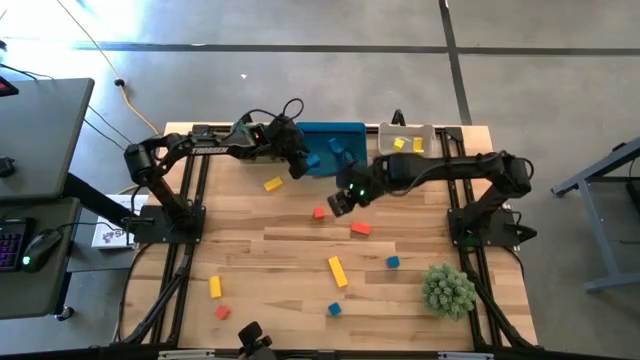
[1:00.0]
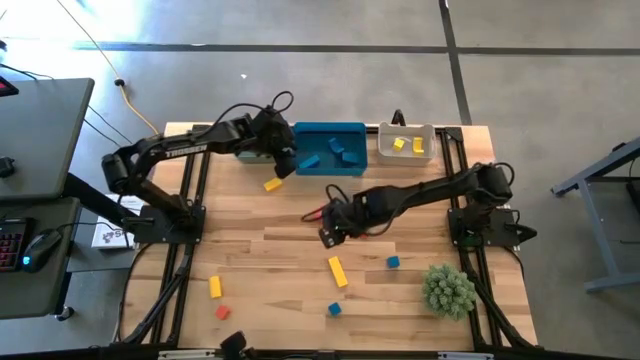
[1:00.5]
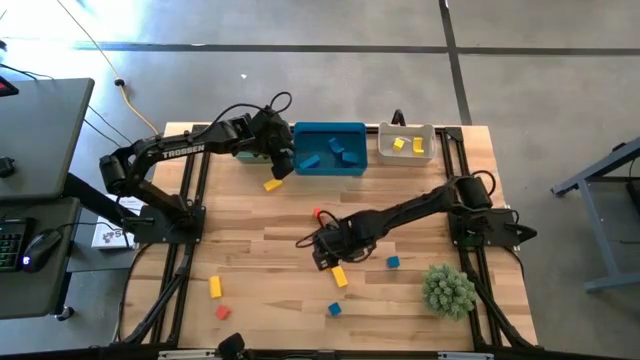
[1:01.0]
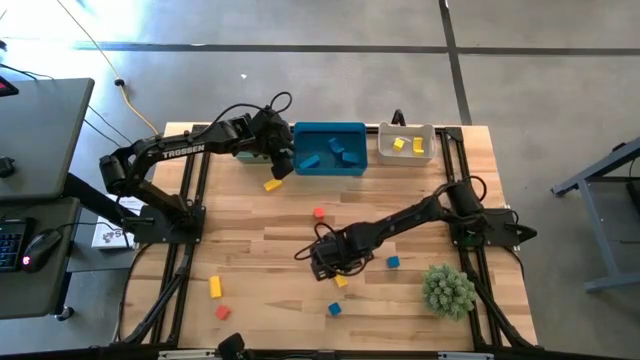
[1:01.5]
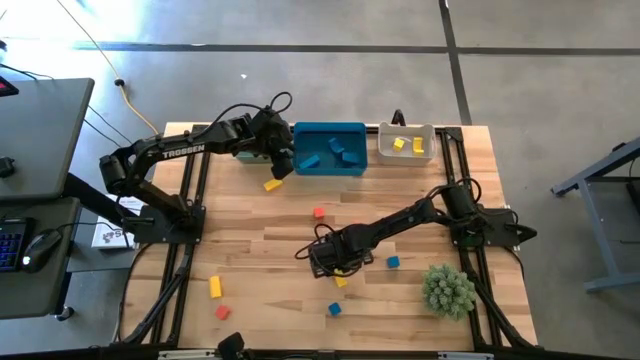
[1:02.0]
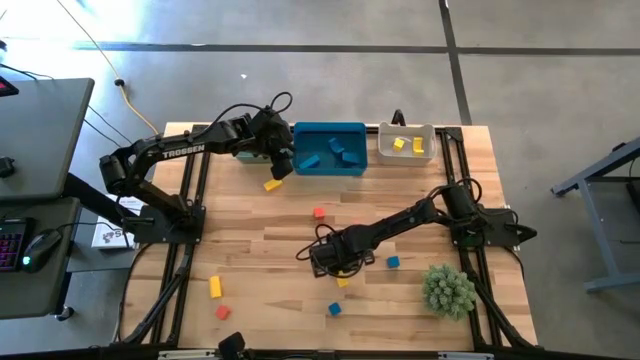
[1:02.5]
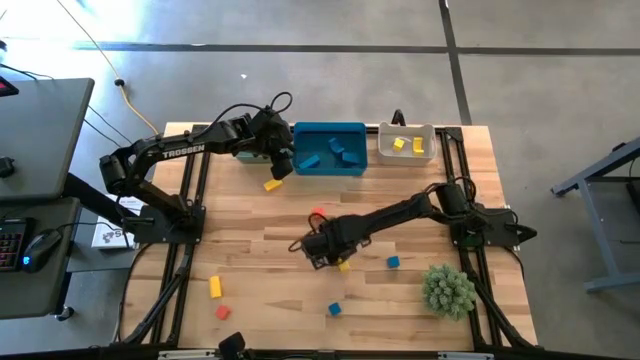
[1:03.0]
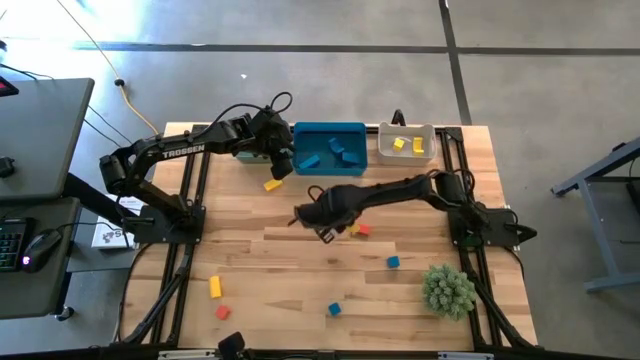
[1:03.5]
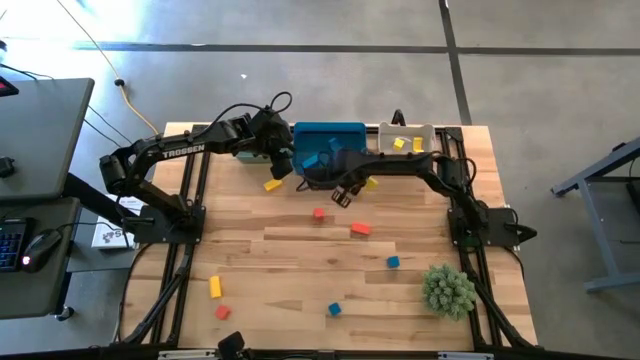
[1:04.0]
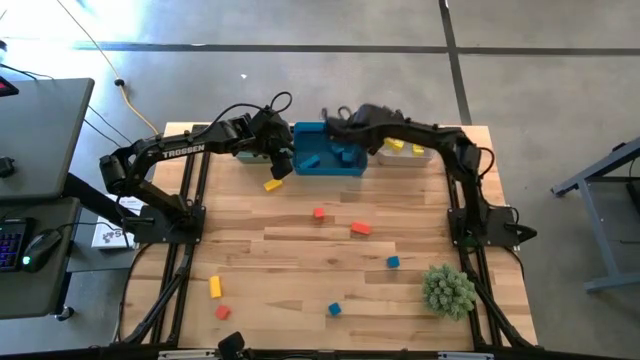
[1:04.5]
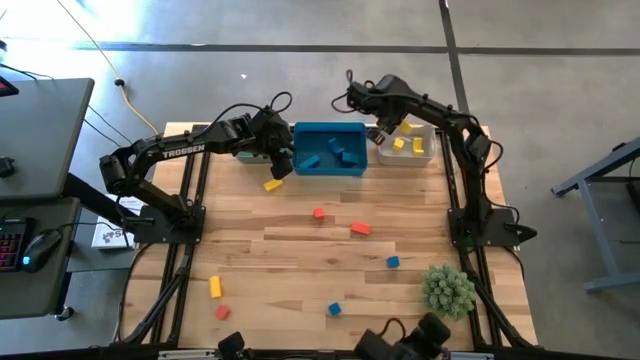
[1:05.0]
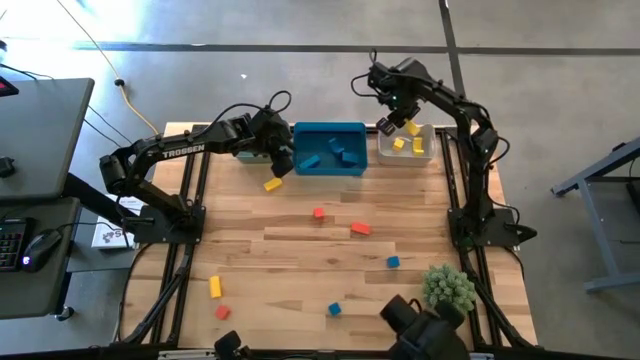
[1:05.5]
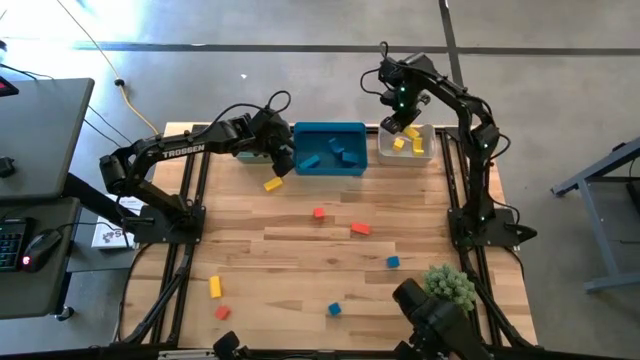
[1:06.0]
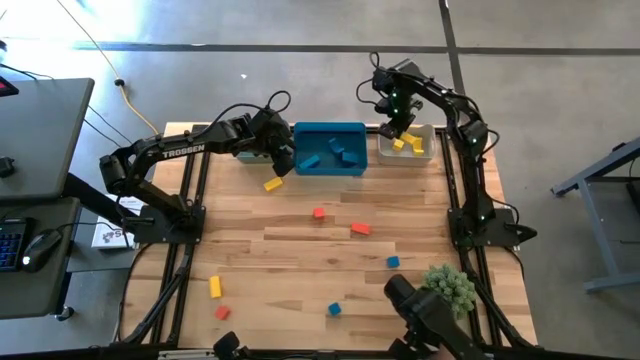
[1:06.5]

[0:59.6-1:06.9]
Task: Sort & place blocks by color
Put the yellow block into the white bin

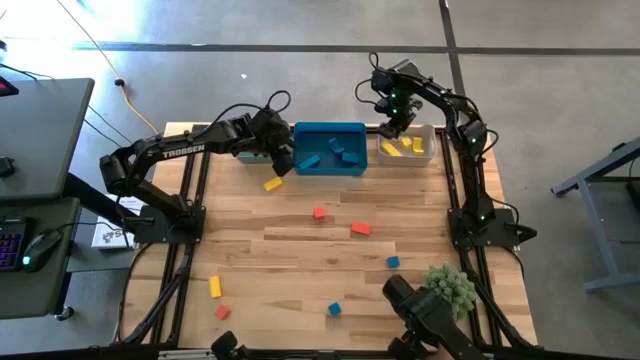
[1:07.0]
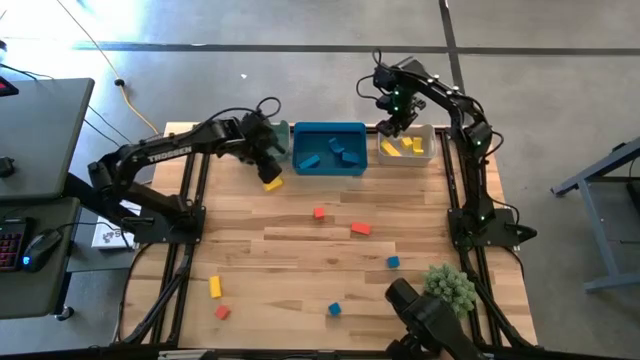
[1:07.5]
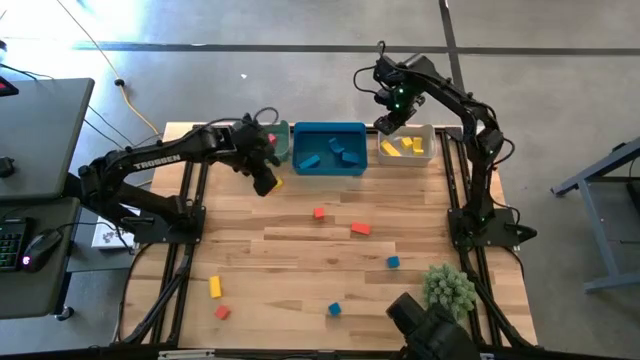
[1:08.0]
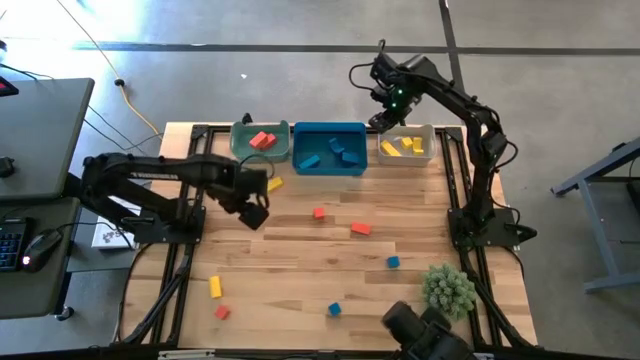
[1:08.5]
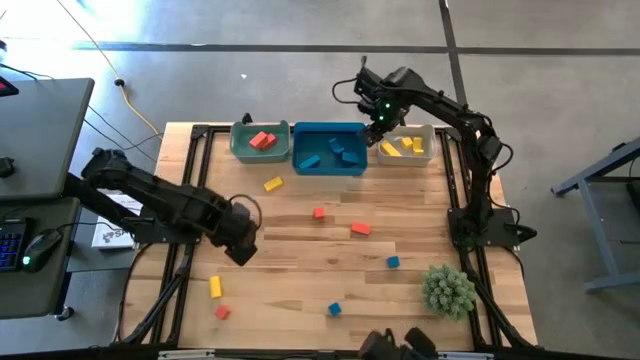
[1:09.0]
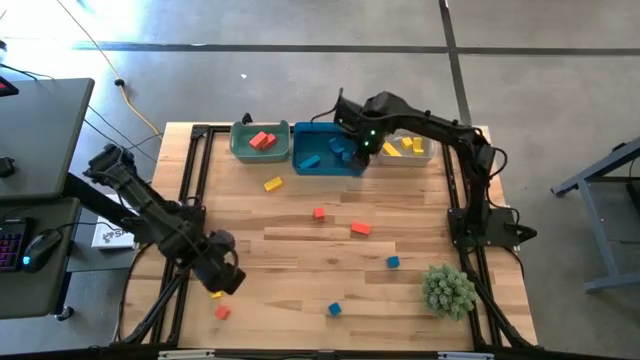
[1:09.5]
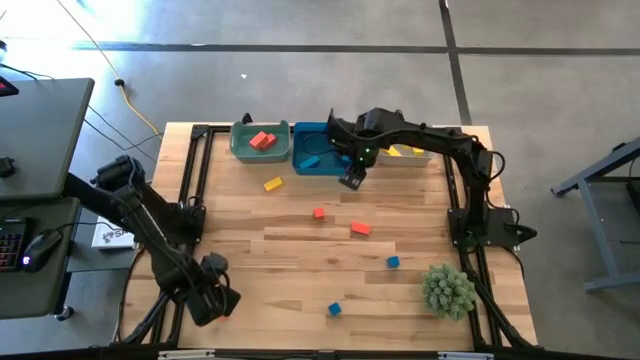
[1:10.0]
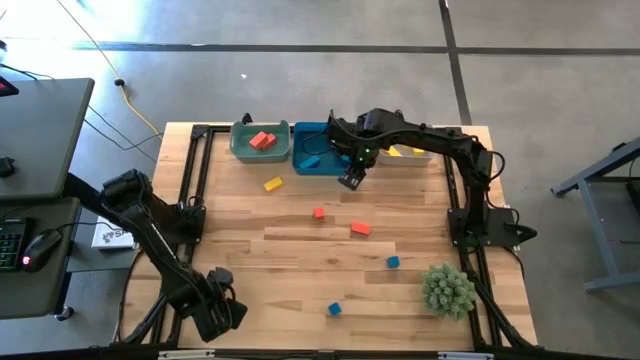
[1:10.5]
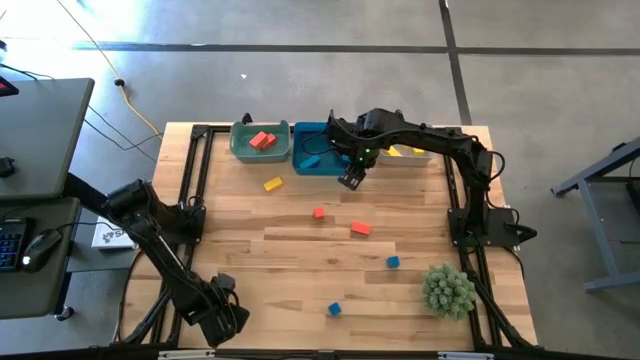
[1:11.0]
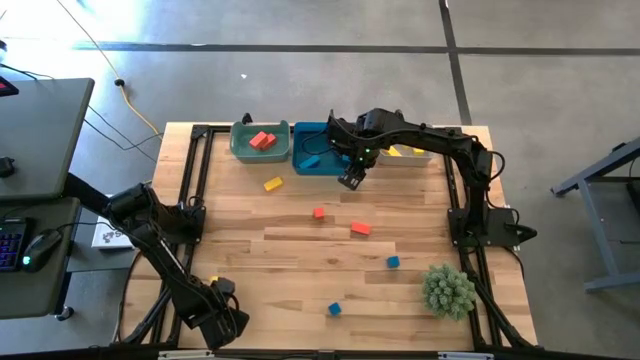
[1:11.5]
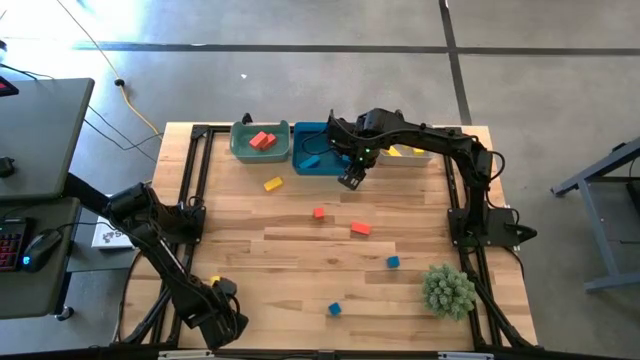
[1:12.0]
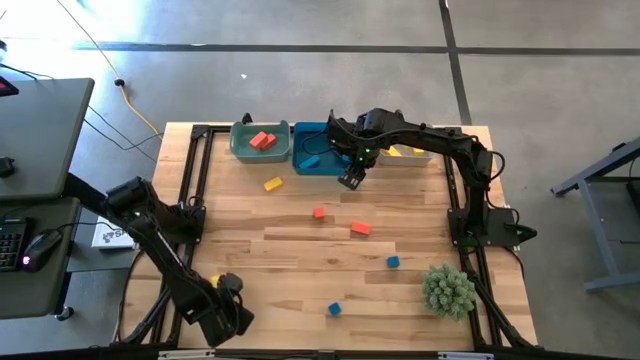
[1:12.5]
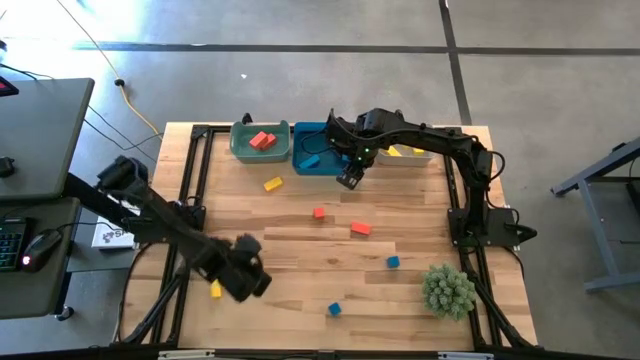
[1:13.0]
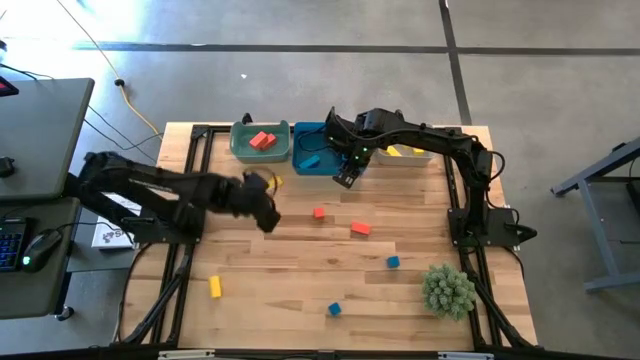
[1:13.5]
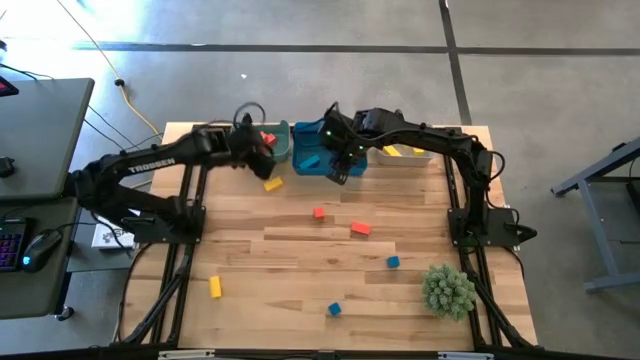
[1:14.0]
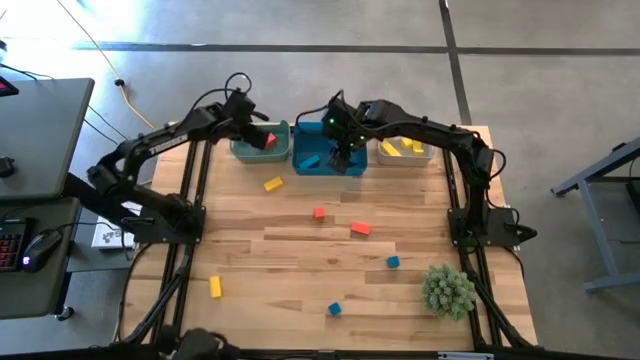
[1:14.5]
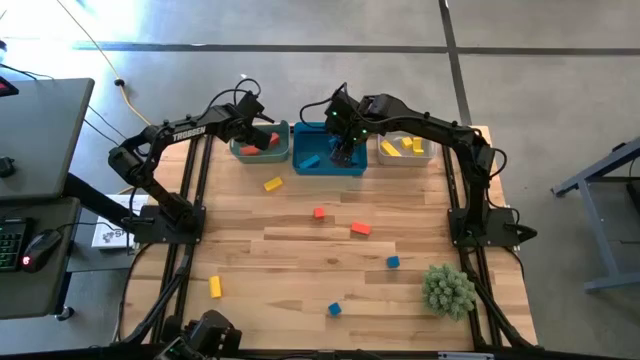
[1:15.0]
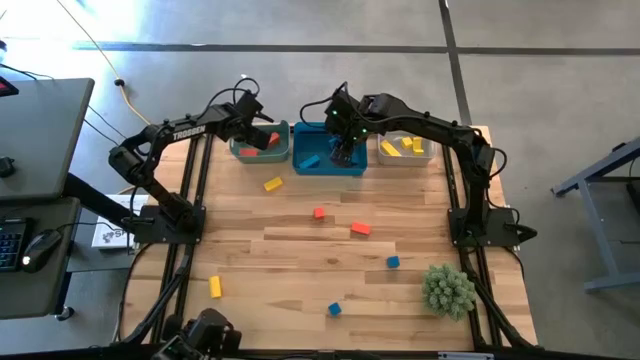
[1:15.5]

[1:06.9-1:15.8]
Put the orange block into the green bin

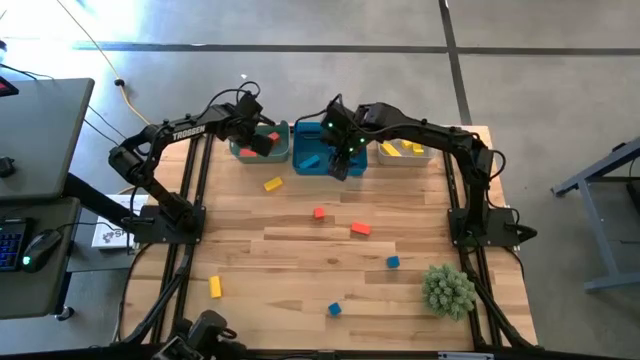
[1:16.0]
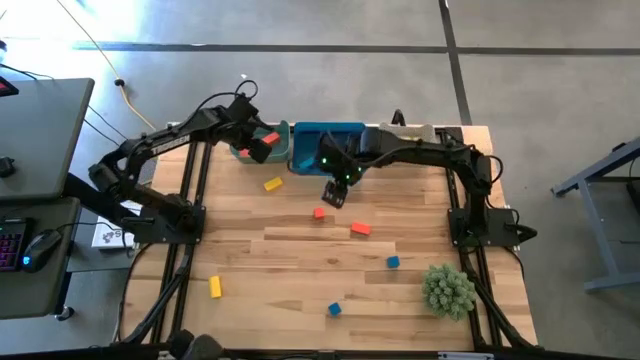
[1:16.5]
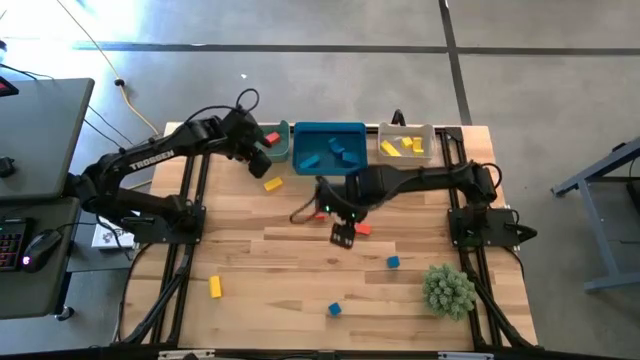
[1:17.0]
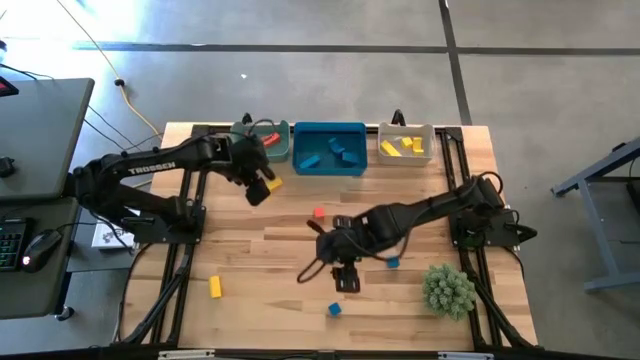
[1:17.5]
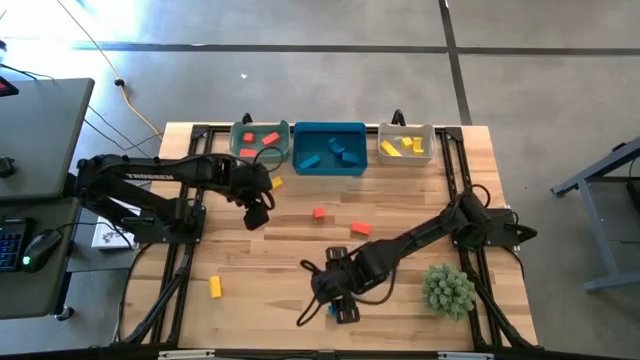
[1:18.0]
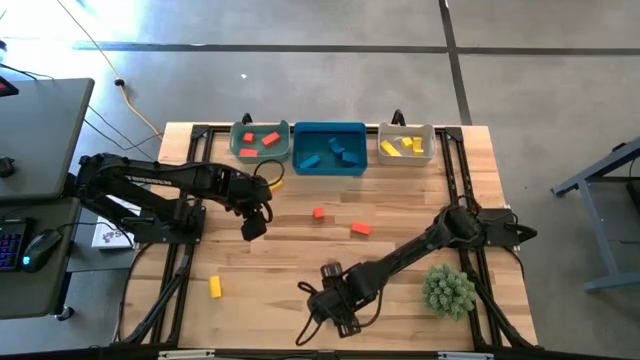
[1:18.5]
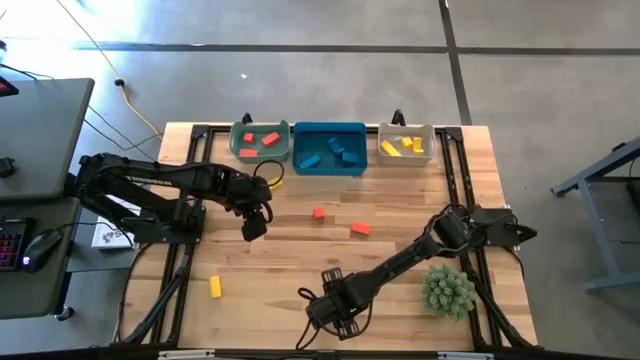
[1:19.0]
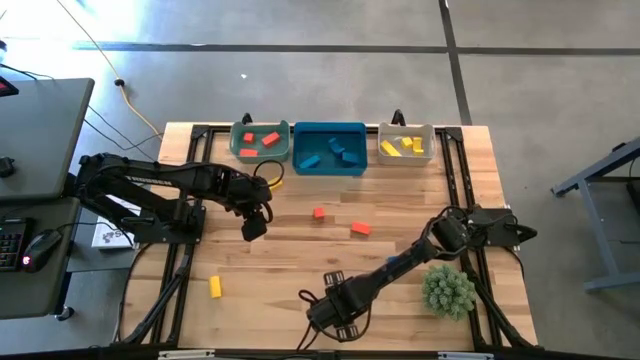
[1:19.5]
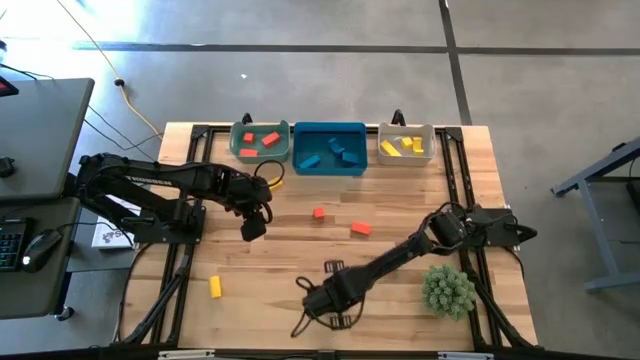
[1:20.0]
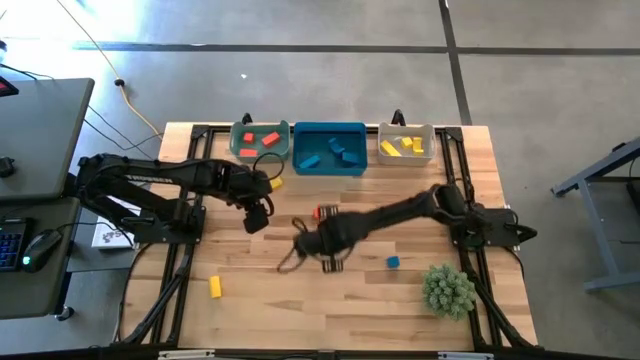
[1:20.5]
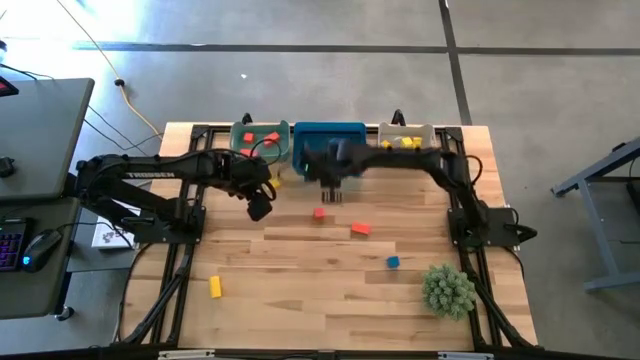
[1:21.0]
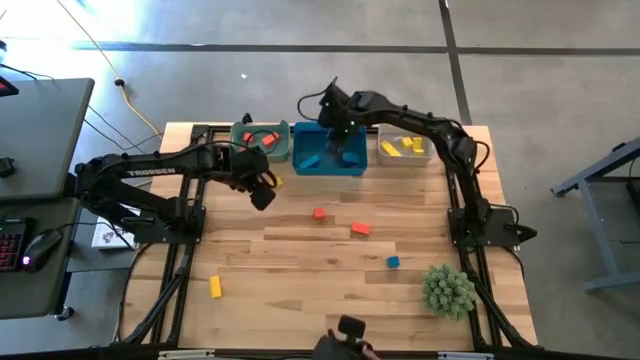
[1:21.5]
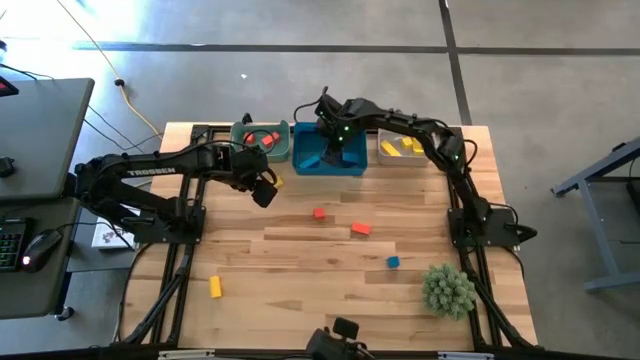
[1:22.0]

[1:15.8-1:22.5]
Put the blue block into the blue bin
